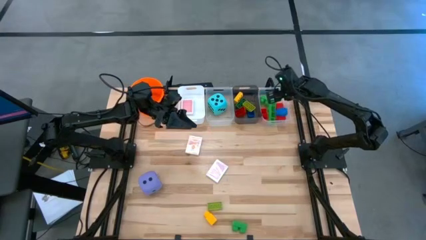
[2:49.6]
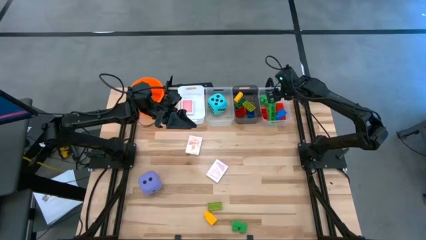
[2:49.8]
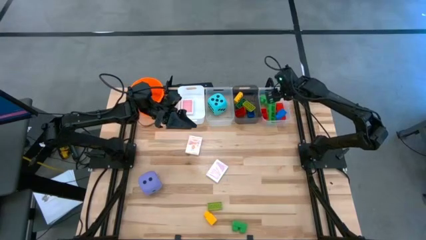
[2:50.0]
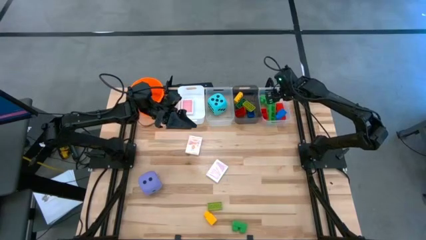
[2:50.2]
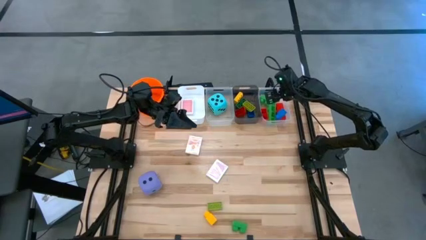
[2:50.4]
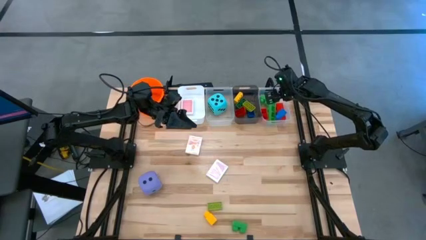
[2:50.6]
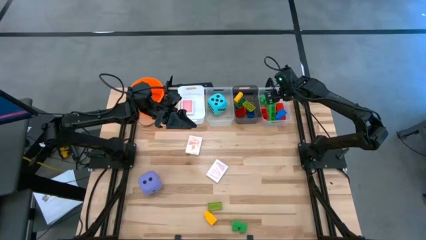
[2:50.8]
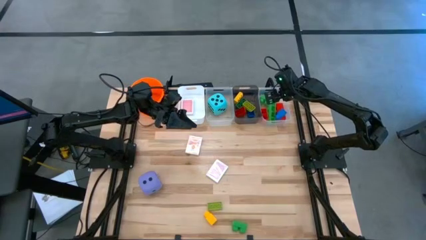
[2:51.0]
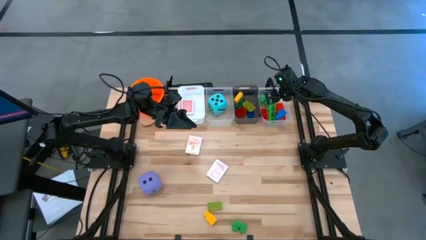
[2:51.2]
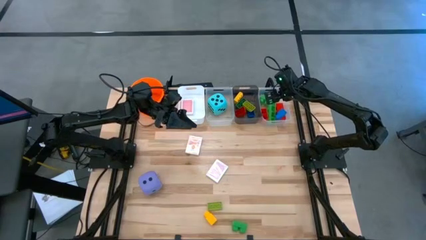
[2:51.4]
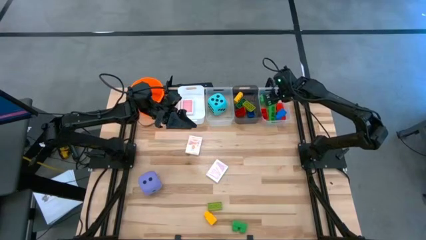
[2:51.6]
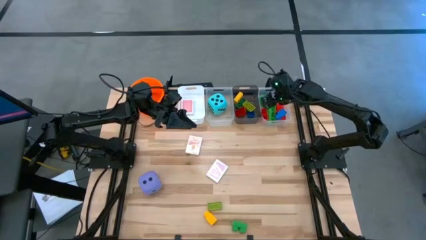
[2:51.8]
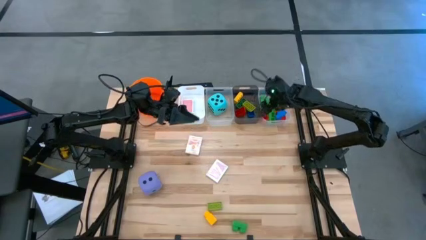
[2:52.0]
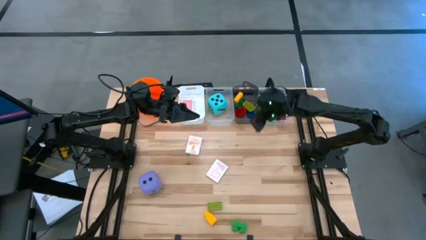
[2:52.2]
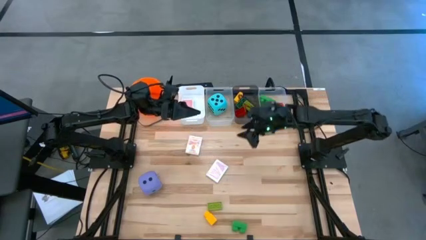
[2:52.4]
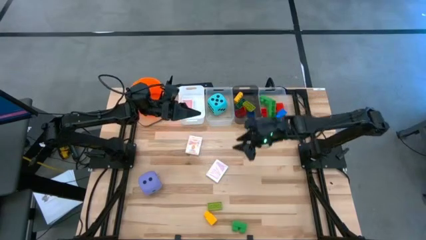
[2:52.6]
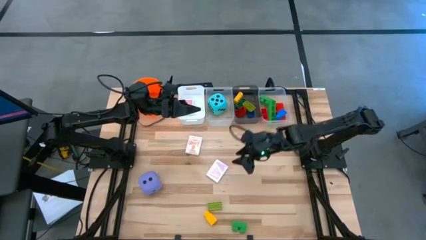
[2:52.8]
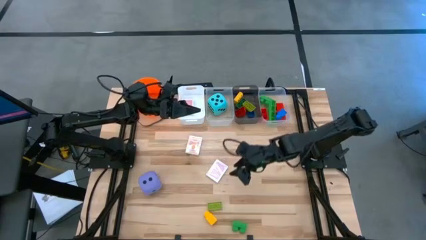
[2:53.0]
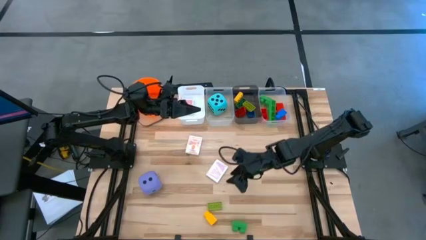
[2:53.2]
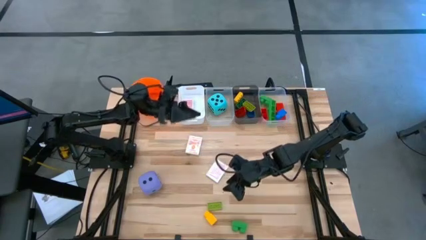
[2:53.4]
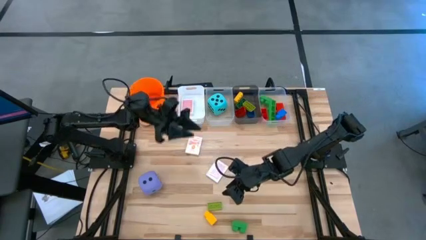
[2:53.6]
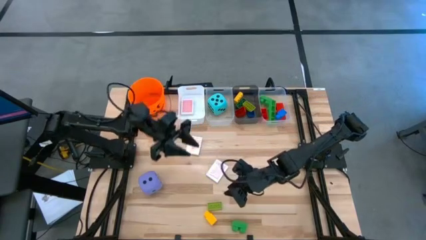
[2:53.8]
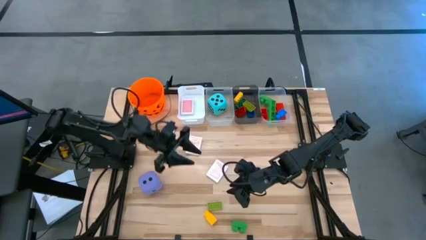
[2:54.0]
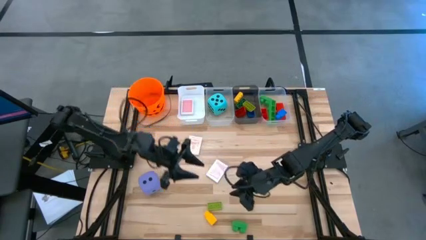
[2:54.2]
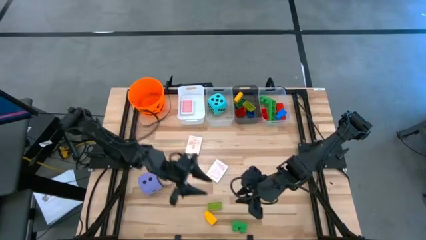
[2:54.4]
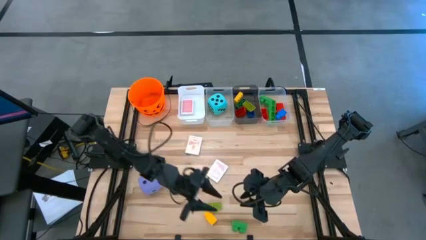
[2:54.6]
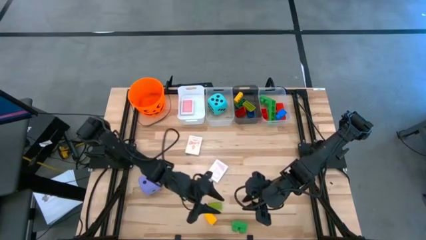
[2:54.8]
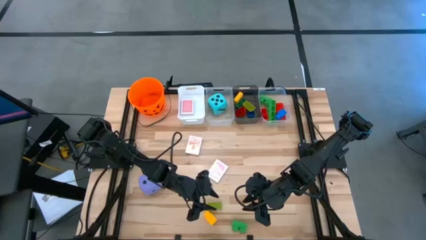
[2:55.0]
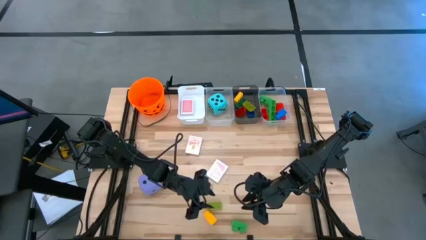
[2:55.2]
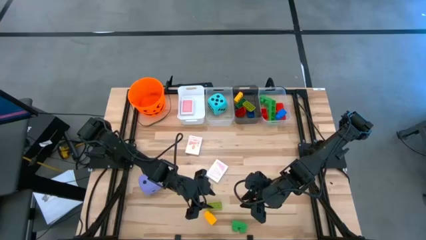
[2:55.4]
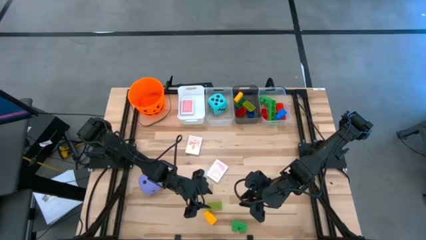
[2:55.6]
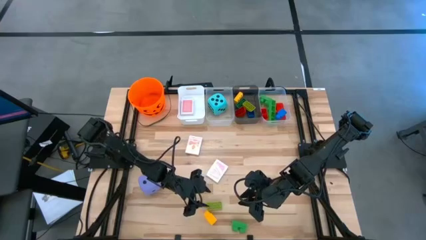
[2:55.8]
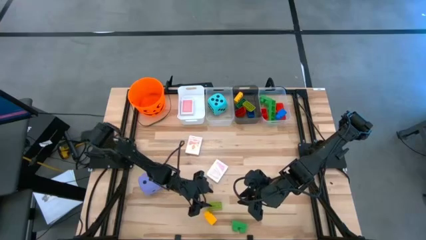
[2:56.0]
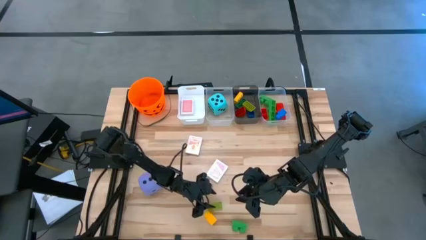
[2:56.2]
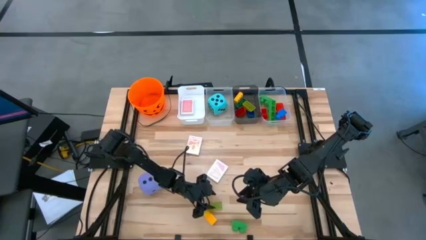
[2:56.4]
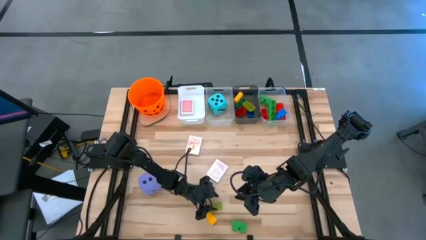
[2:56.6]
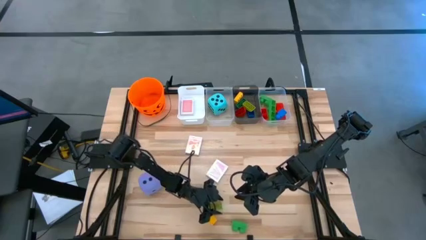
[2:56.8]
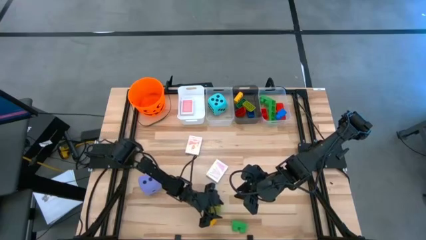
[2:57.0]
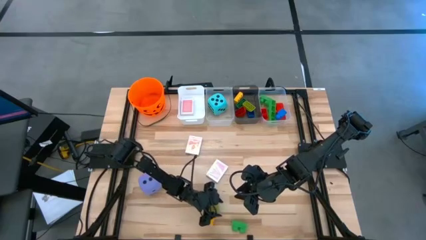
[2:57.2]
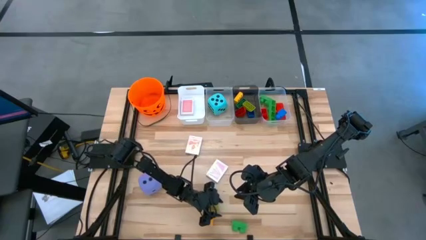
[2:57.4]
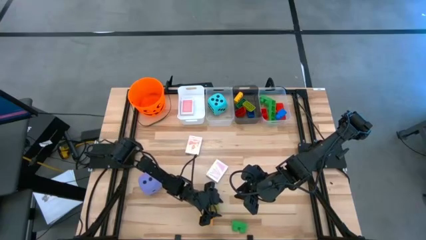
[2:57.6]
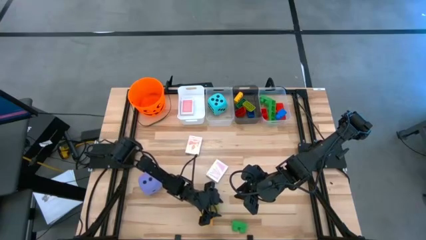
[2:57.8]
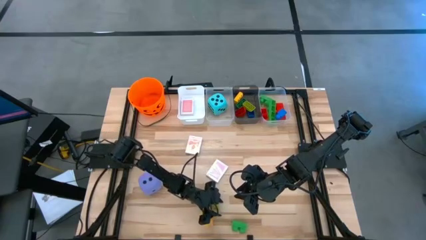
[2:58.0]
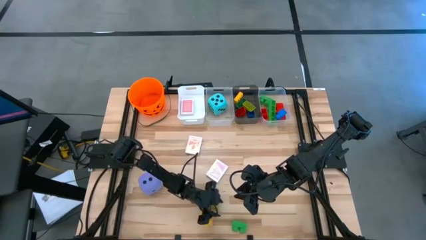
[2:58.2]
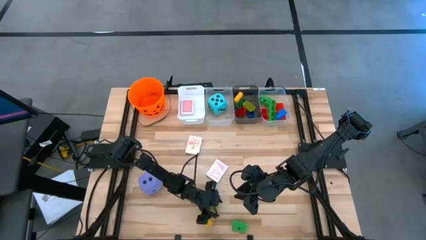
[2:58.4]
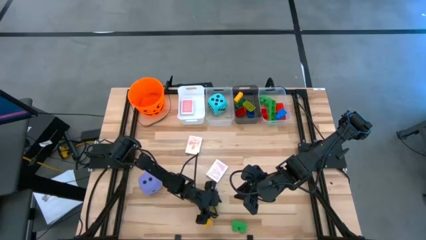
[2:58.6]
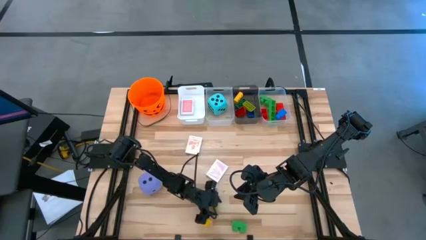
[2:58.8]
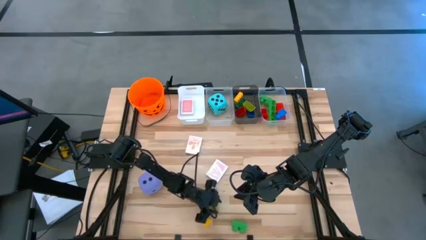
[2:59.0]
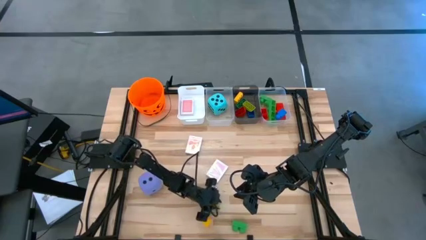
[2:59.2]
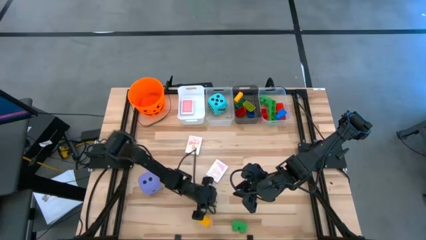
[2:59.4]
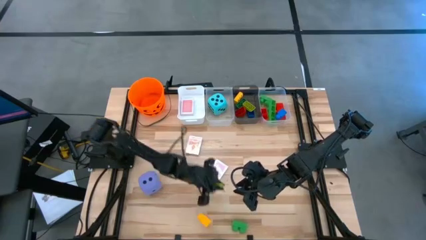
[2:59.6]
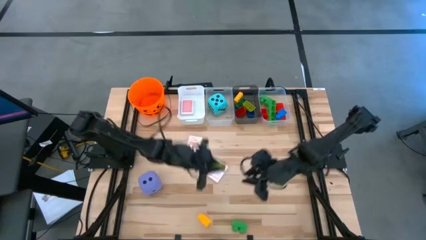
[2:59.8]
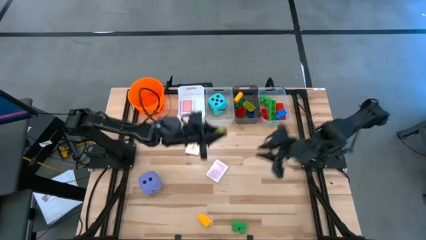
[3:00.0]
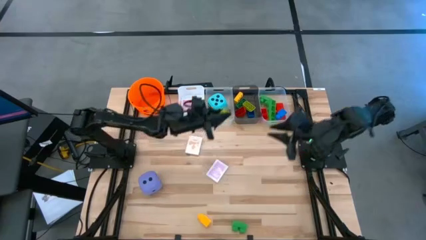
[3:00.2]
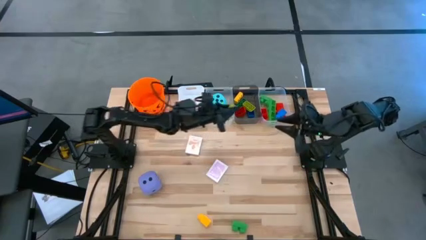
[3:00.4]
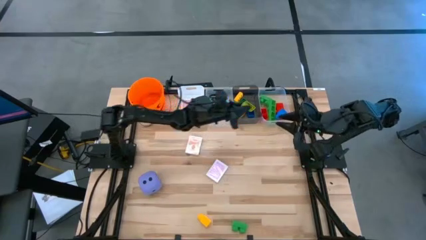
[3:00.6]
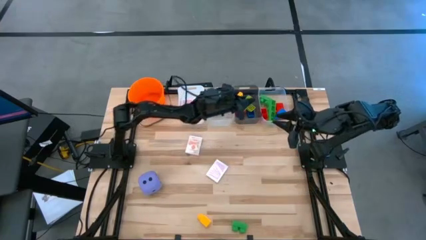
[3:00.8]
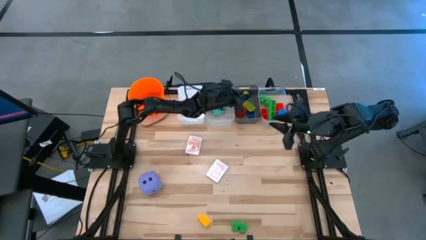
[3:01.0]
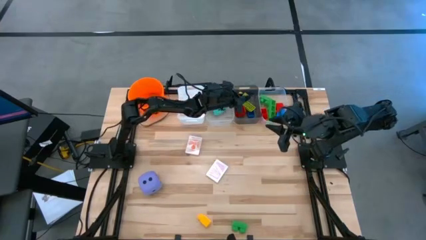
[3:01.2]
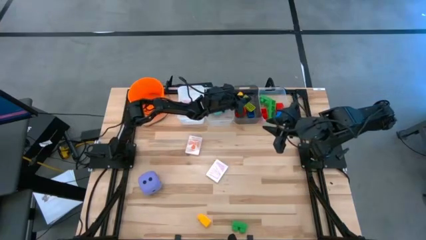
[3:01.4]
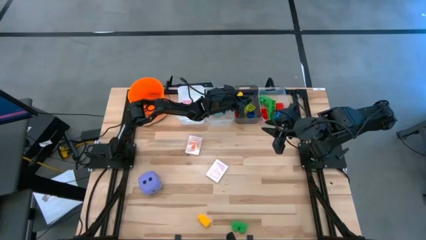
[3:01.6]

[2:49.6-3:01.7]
Task: Pick & Place Toys
Put the small green game piece into the black bin
